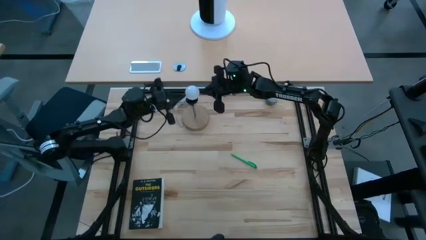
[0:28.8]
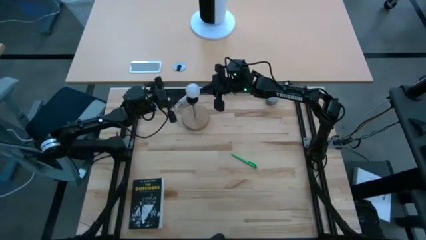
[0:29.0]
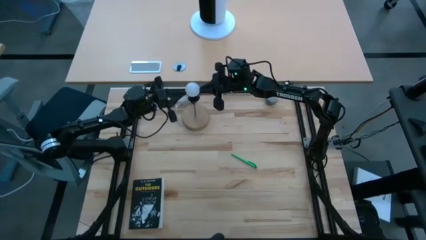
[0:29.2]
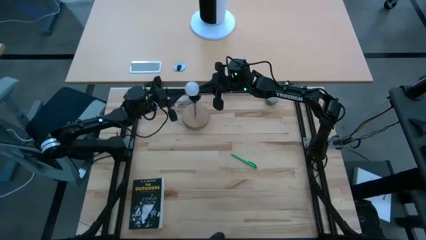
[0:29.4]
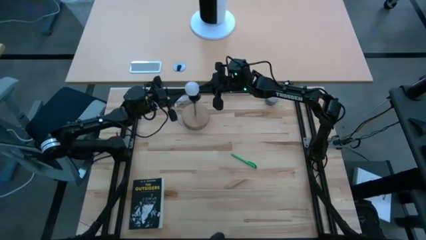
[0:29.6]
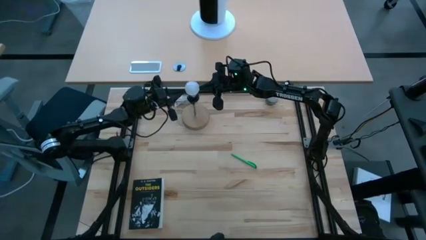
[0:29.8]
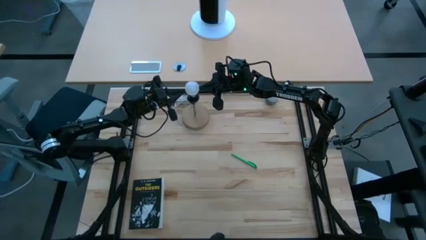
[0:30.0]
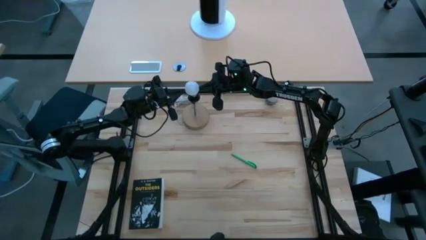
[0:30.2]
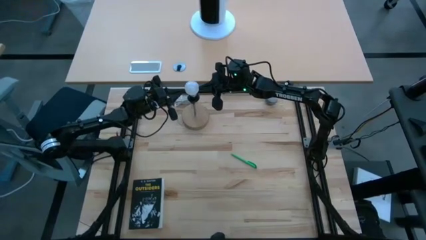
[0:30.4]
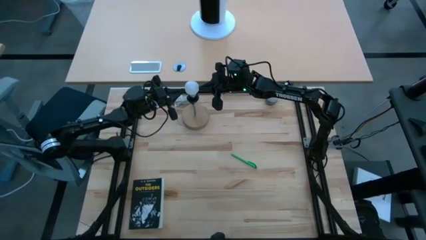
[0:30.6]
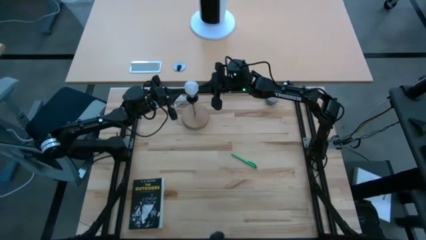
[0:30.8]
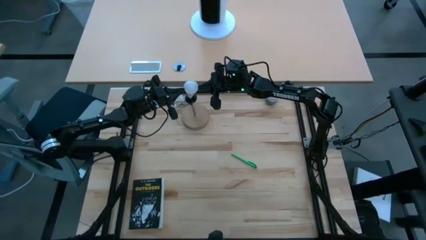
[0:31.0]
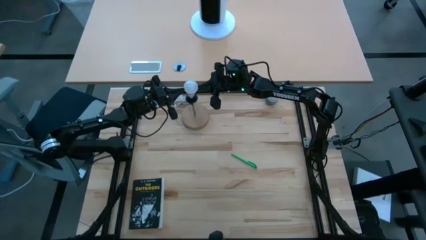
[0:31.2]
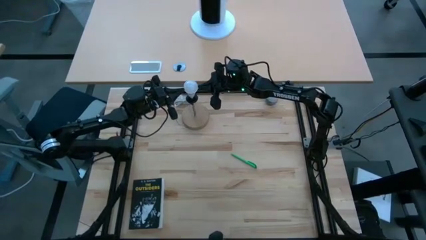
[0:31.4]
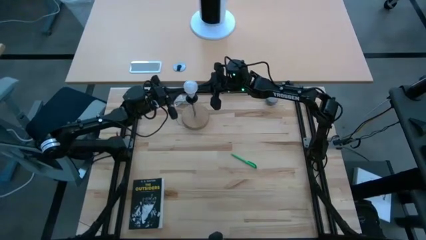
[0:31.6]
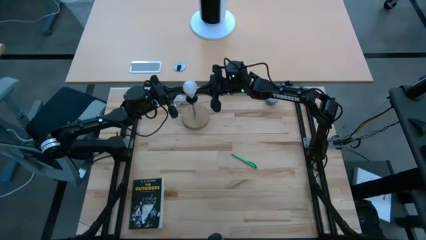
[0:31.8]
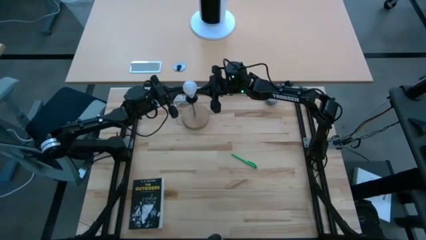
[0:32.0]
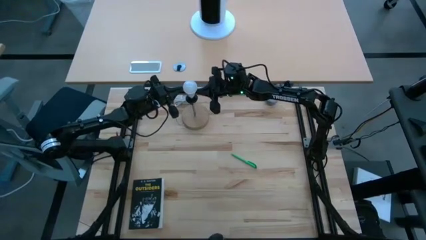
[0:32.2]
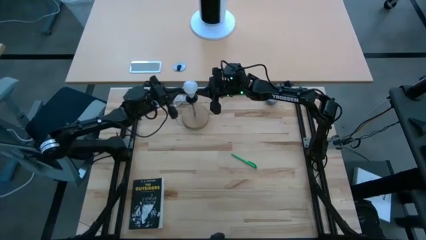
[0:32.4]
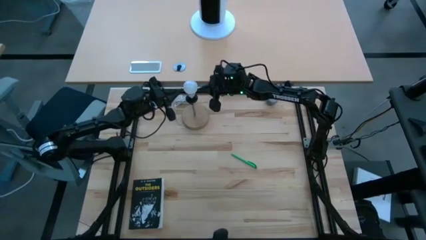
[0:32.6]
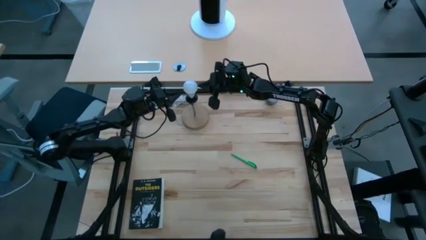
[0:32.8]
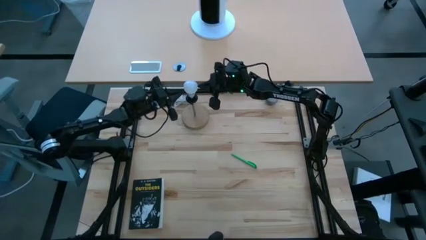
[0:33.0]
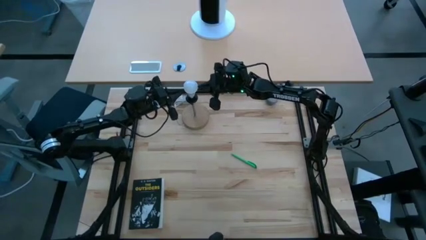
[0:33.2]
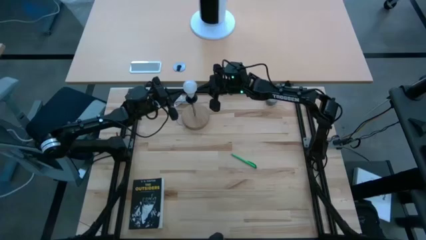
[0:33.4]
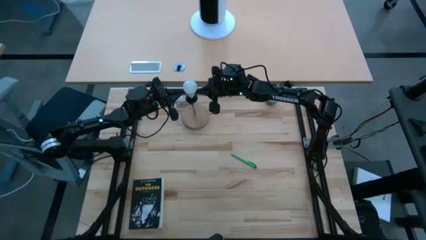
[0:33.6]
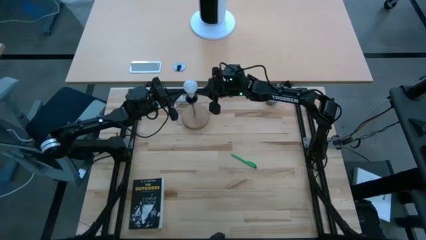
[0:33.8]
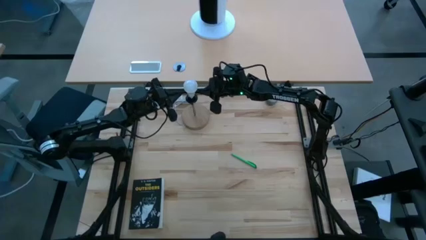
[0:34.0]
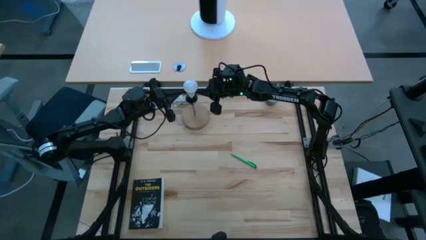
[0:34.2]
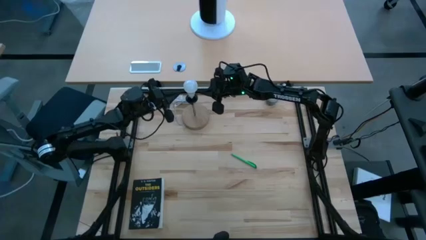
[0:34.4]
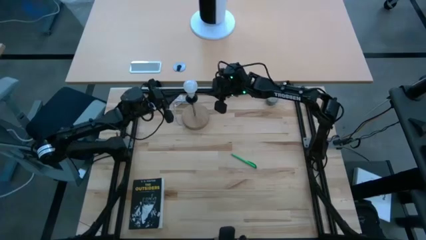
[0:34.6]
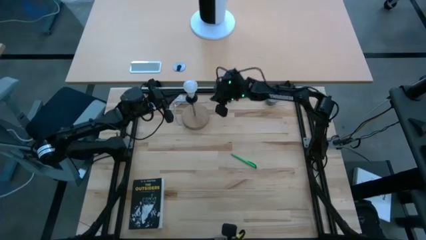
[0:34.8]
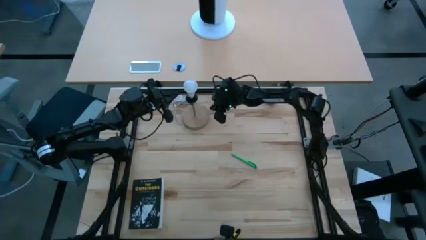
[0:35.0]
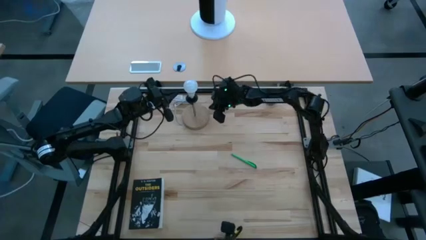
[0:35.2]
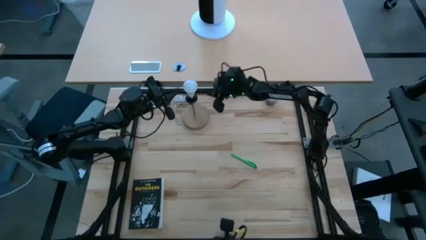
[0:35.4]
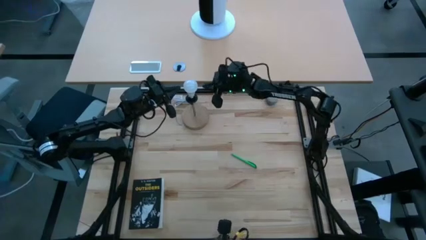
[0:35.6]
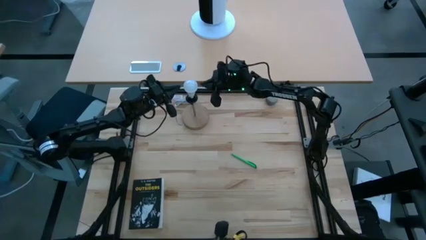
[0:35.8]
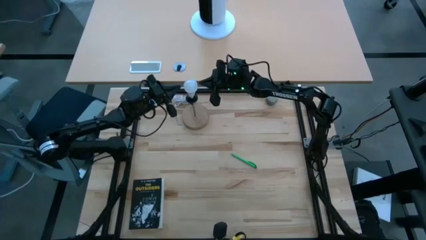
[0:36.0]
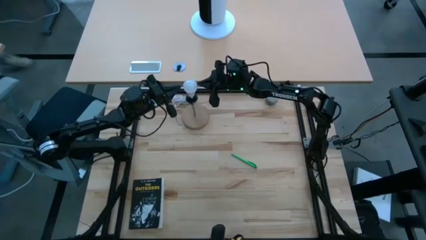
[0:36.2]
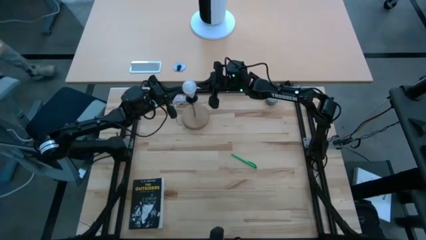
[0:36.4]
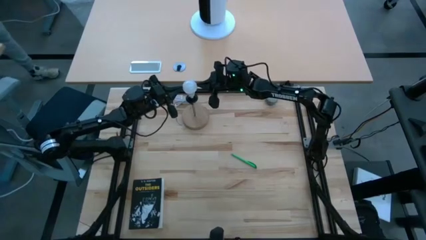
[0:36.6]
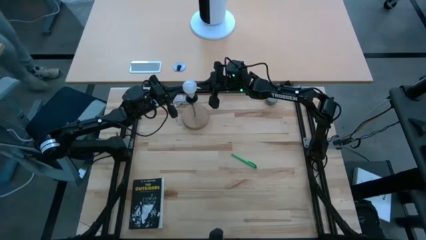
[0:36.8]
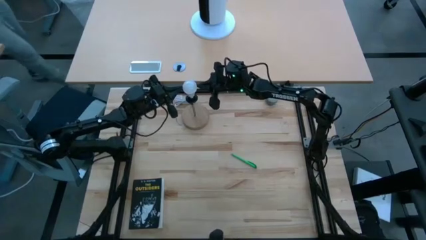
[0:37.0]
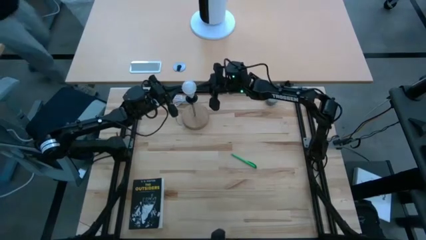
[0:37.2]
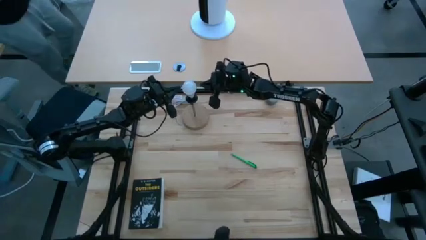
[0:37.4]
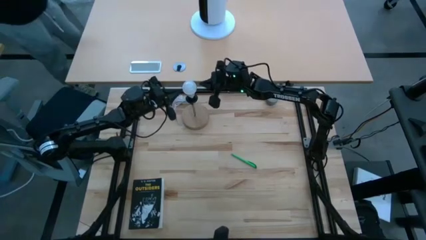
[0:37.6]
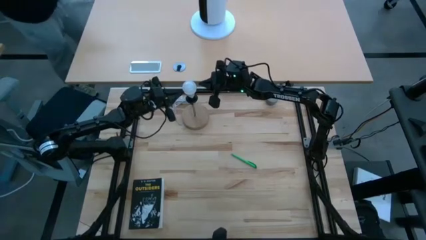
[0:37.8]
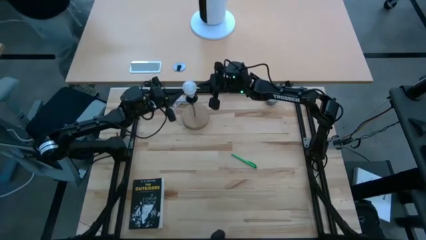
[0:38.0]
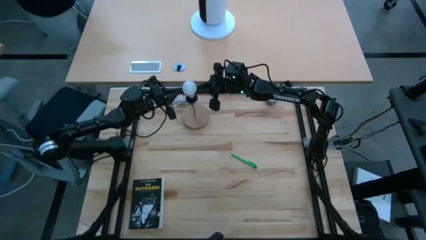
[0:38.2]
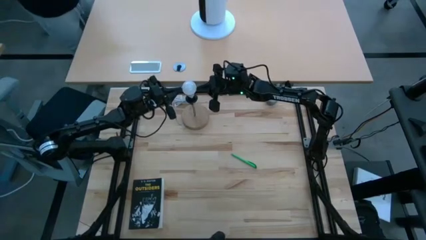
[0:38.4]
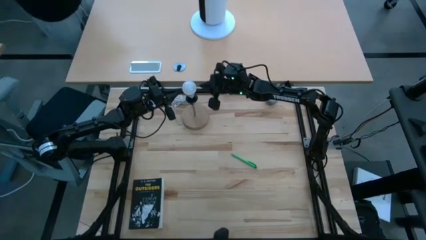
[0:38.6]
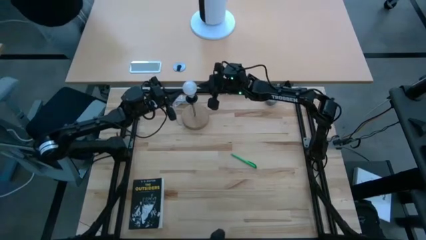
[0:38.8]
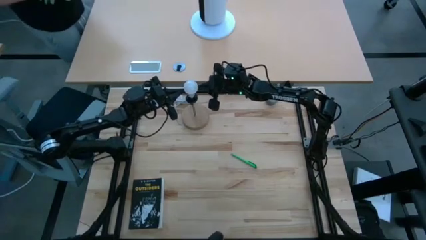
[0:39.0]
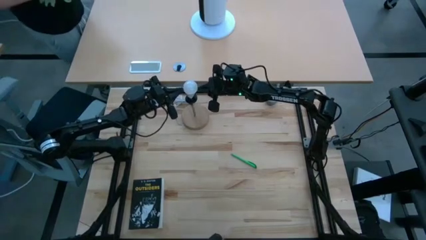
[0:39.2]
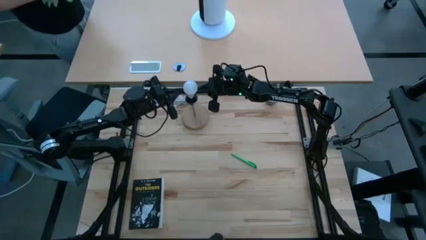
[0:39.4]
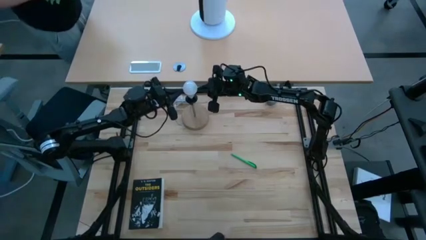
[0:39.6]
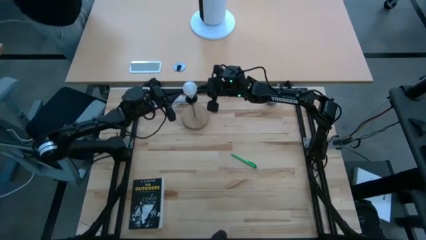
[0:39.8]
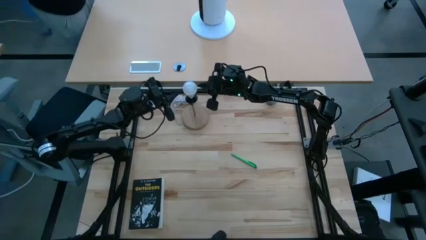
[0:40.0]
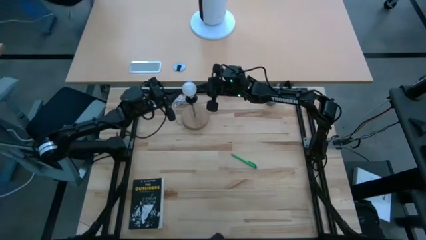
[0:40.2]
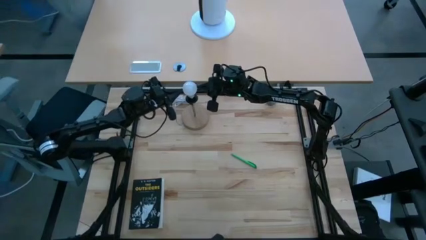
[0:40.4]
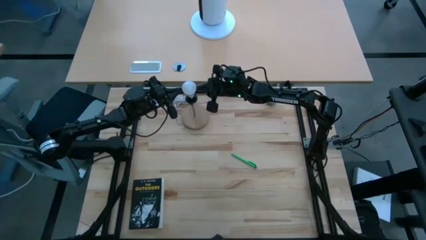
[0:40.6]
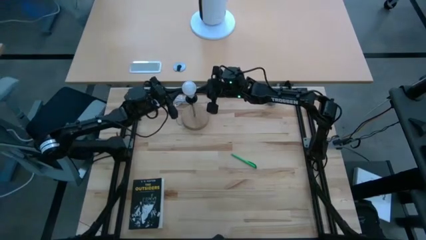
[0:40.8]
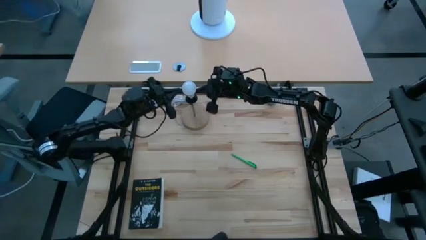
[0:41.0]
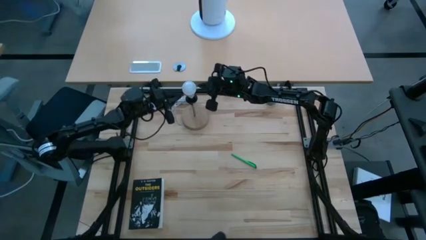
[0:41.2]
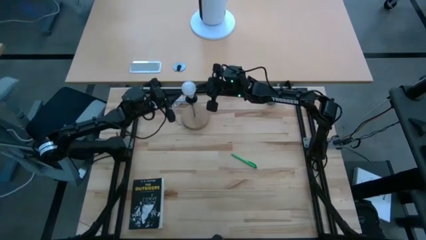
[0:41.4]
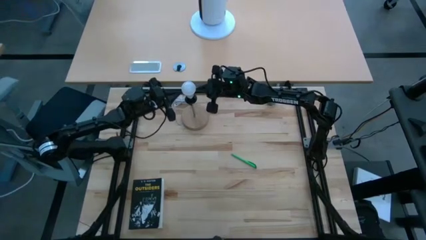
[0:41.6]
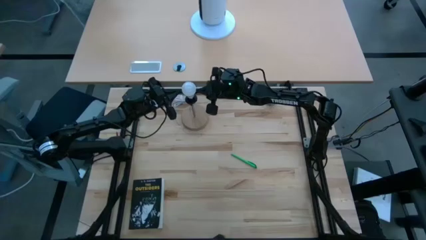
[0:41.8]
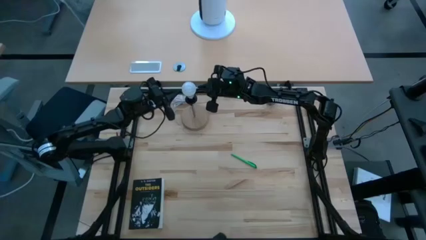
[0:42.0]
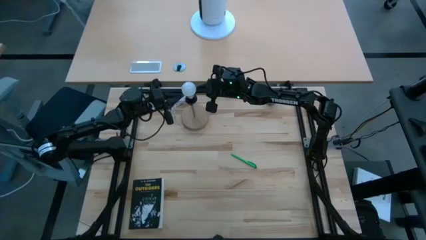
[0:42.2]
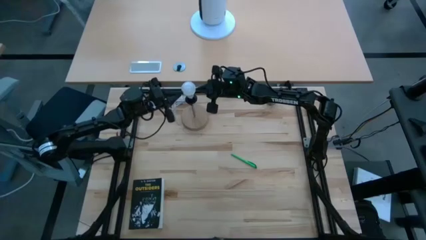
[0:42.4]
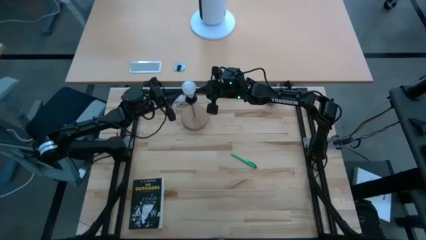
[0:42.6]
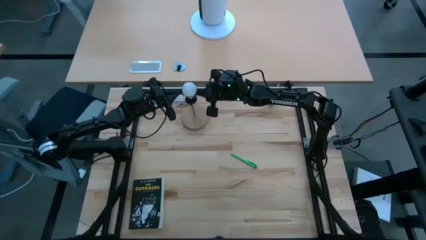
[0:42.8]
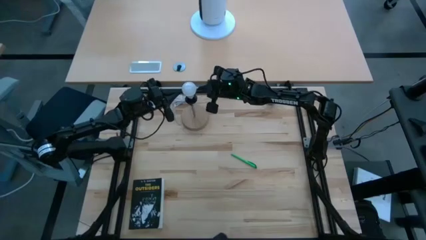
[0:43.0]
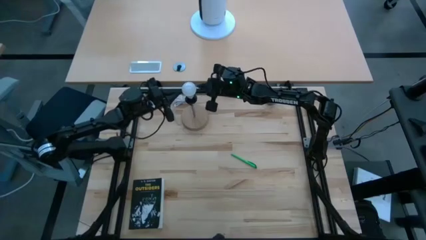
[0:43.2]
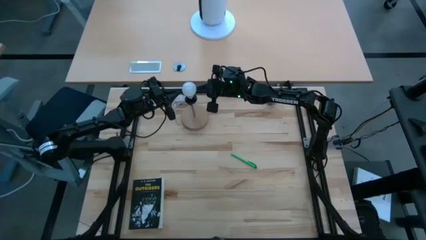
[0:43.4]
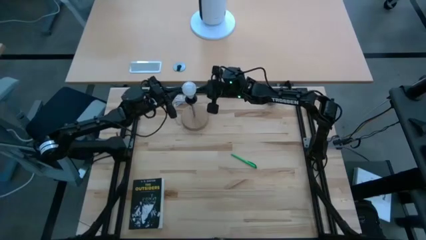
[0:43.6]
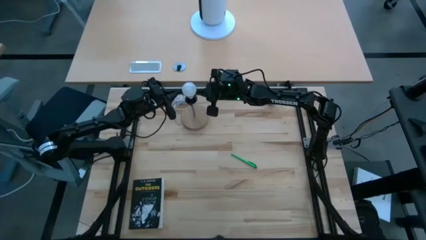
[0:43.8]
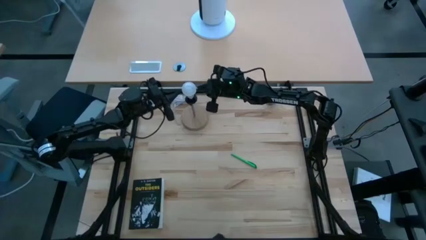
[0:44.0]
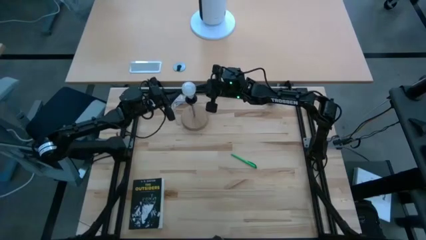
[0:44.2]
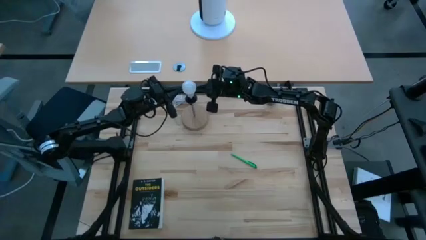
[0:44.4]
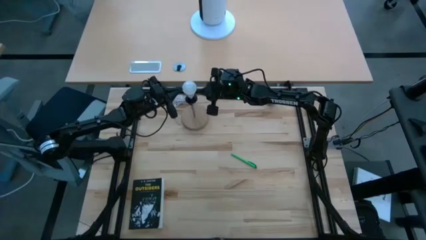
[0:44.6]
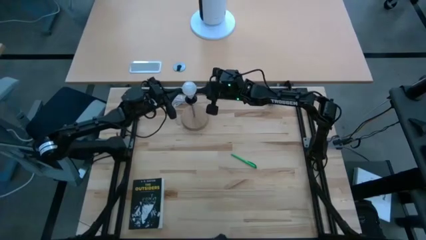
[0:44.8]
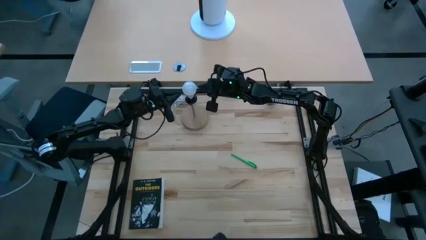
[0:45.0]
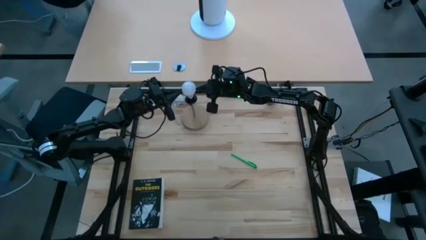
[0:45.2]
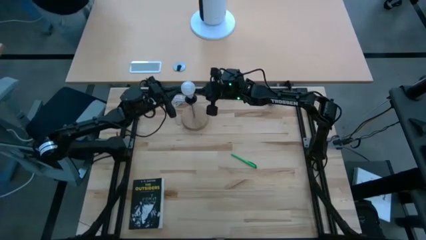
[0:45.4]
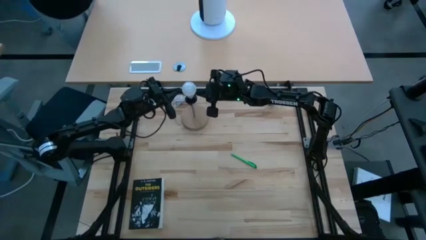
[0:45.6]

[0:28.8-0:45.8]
Task: Screw lightbulb
Insert the lightbulb into the lamp

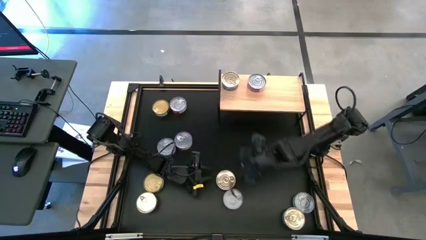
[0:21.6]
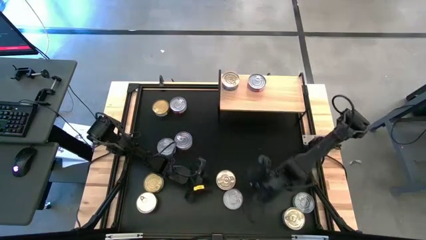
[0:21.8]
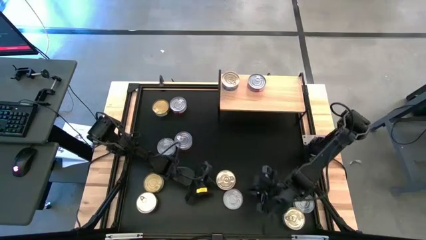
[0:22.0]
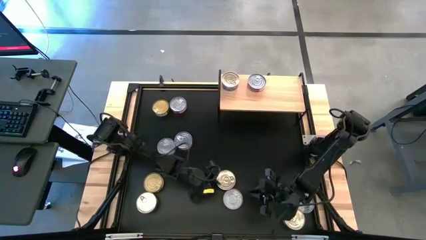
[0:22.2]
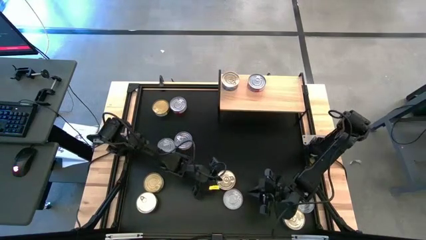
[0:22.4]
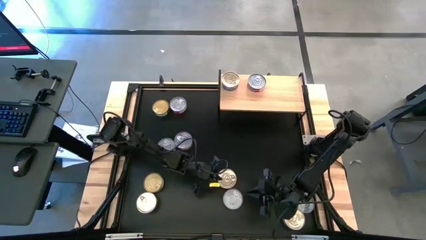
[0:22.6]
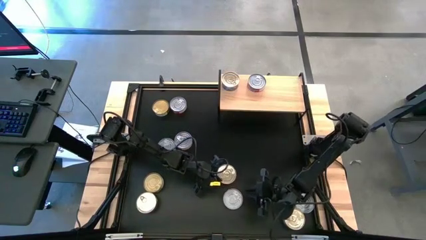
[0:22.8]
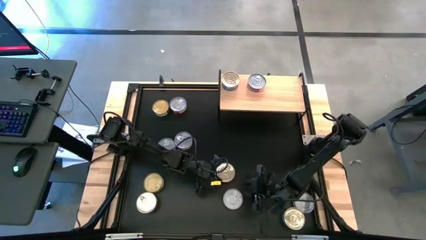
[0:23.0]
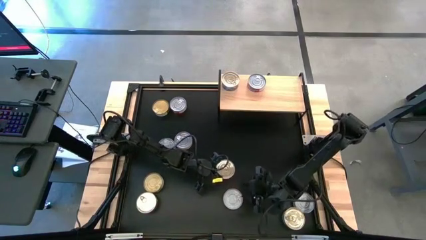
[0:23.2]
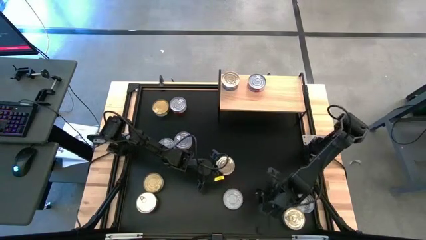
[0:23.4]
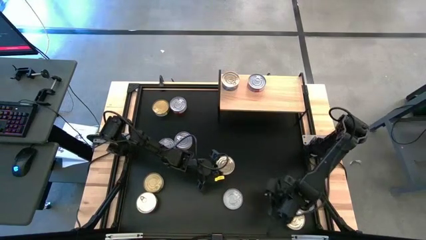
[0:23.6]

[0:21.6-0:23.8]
Task: Stack canned seafood by type on shelf
Put the blue tuna can on the shelf
